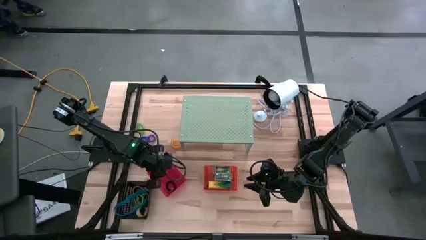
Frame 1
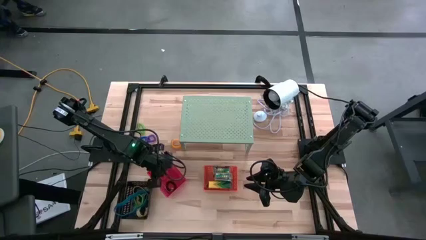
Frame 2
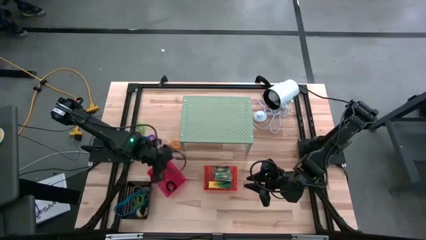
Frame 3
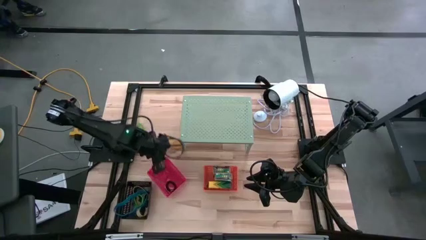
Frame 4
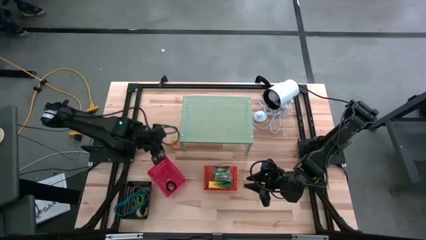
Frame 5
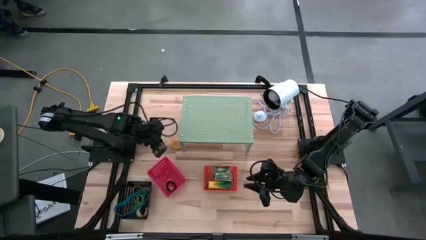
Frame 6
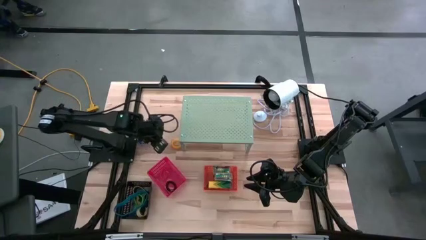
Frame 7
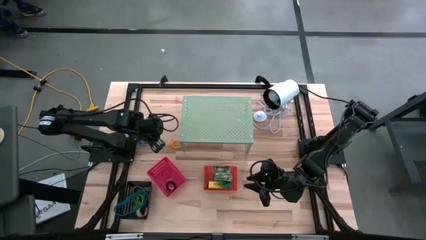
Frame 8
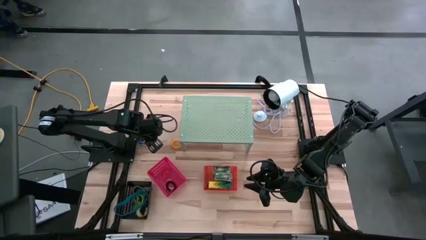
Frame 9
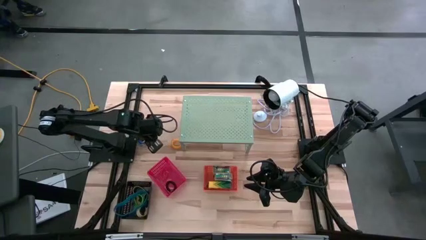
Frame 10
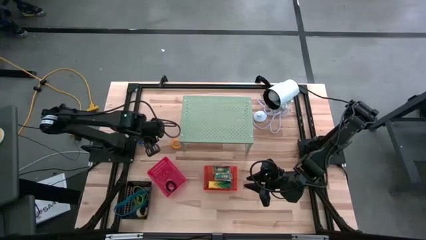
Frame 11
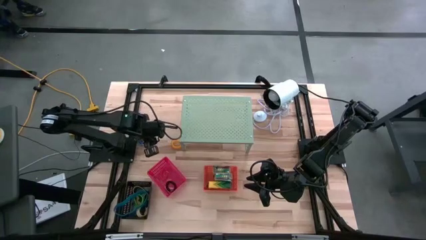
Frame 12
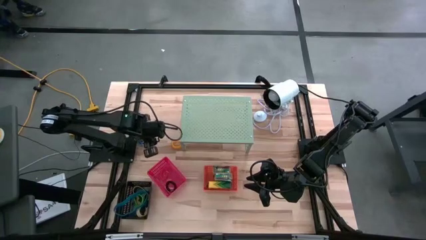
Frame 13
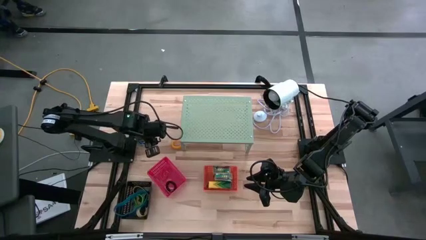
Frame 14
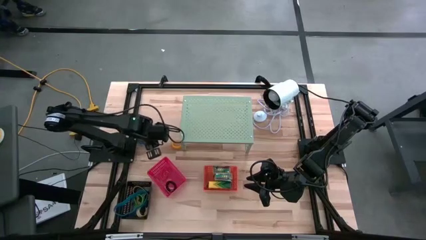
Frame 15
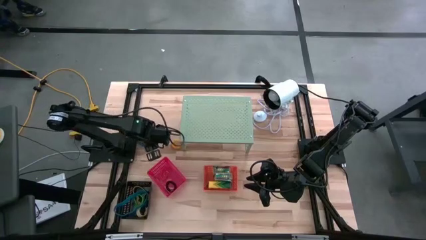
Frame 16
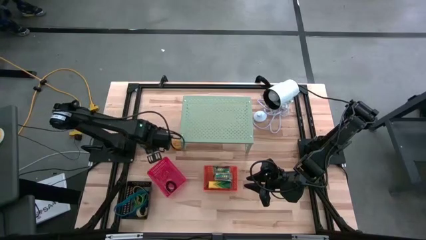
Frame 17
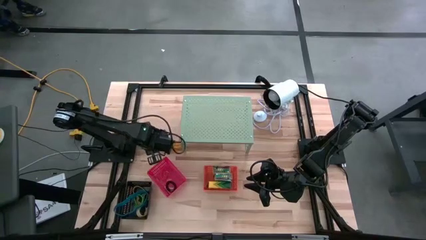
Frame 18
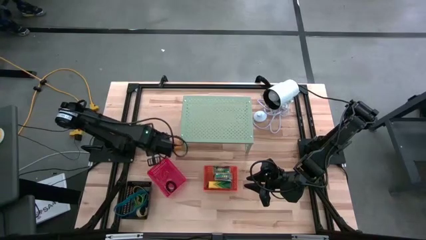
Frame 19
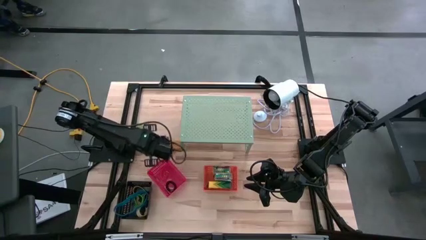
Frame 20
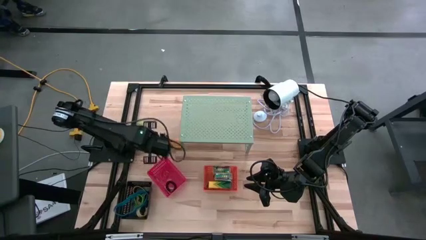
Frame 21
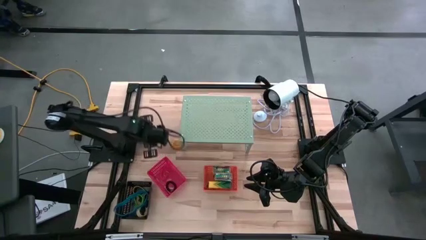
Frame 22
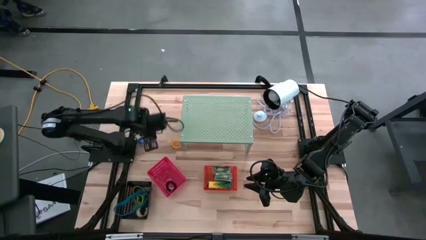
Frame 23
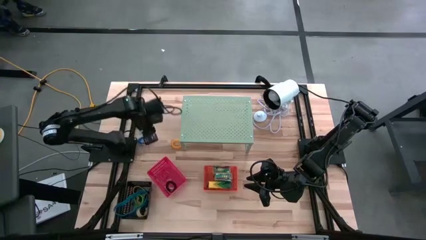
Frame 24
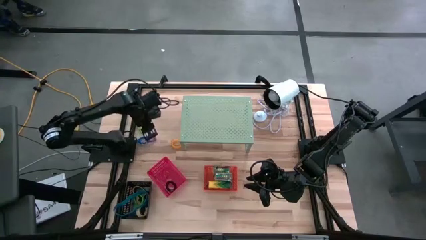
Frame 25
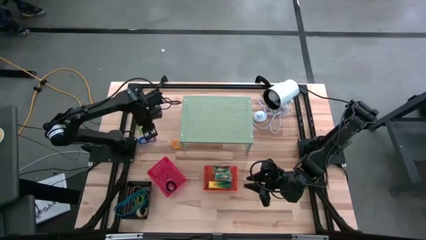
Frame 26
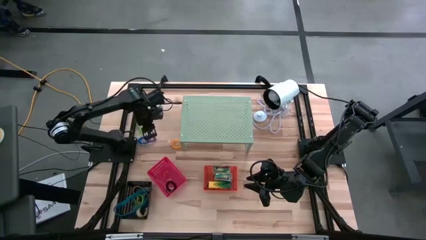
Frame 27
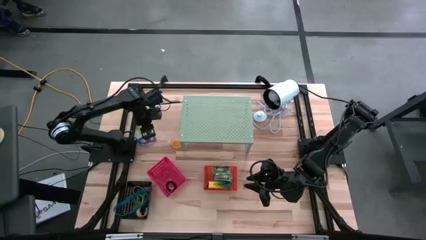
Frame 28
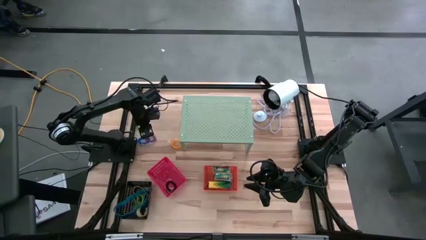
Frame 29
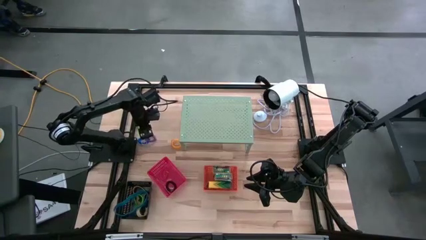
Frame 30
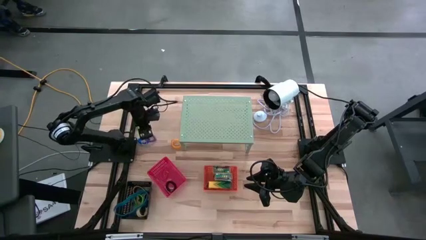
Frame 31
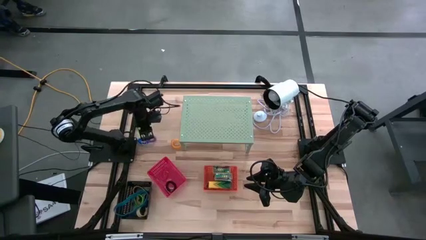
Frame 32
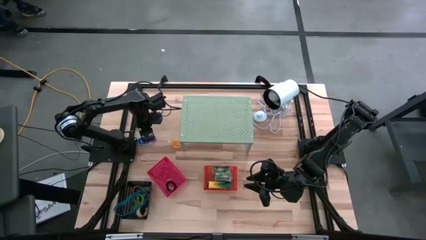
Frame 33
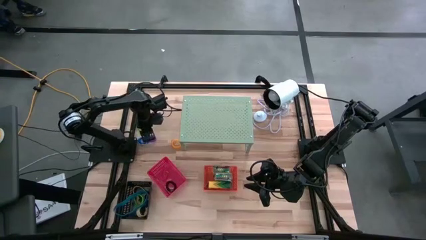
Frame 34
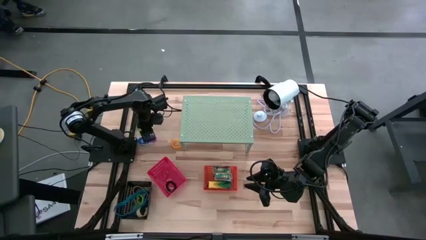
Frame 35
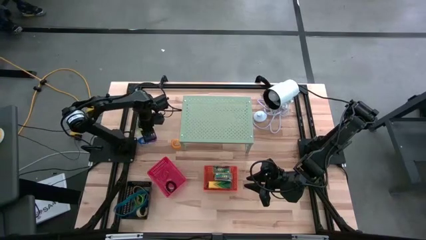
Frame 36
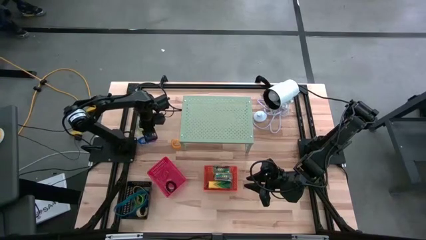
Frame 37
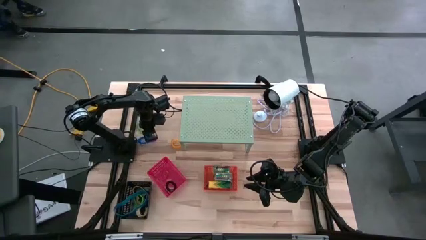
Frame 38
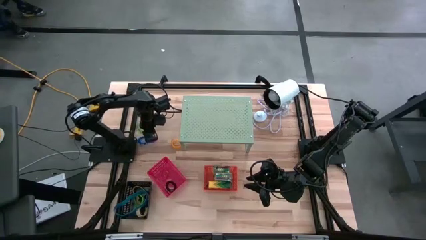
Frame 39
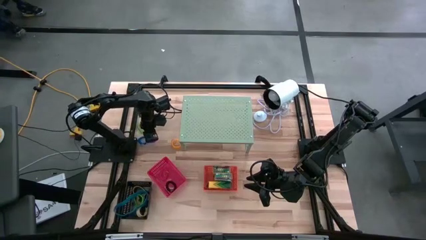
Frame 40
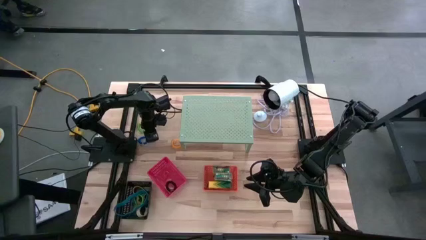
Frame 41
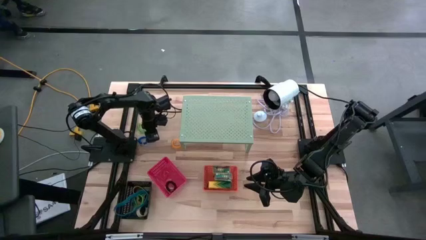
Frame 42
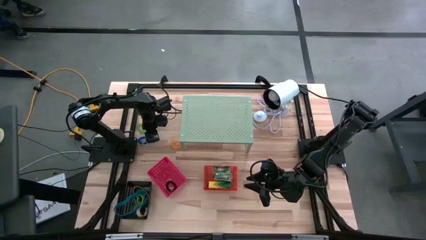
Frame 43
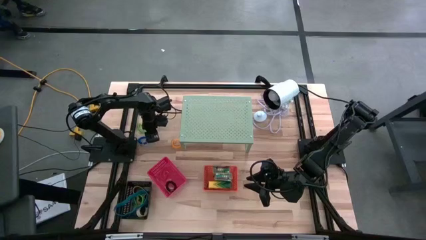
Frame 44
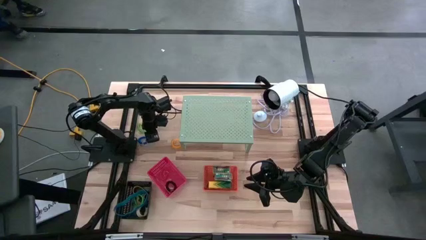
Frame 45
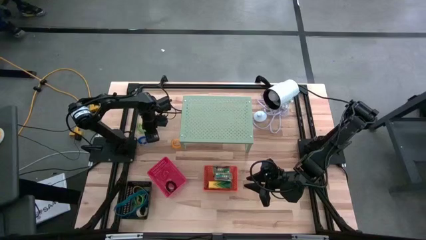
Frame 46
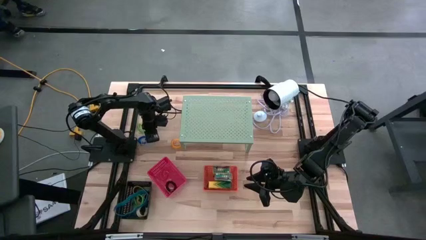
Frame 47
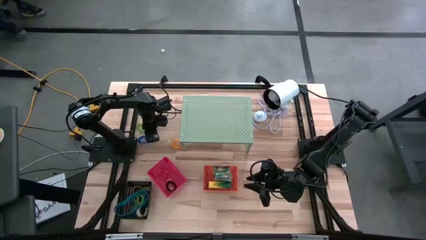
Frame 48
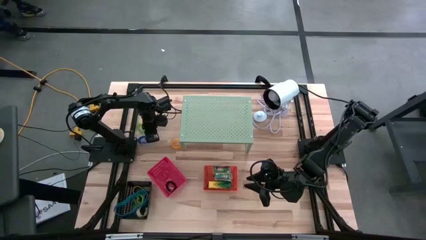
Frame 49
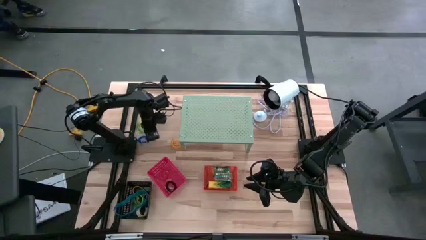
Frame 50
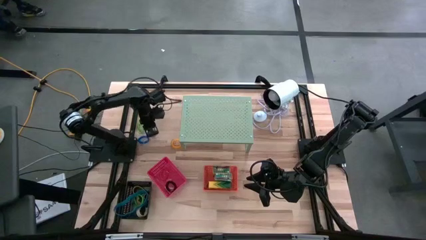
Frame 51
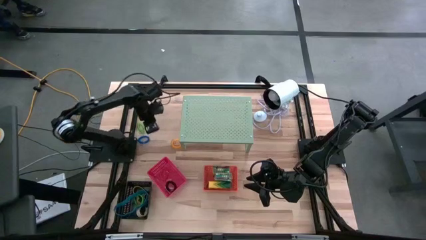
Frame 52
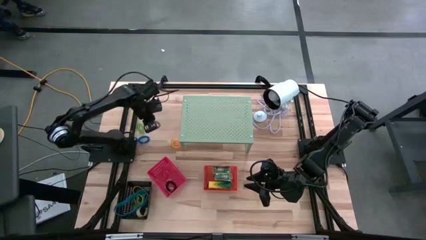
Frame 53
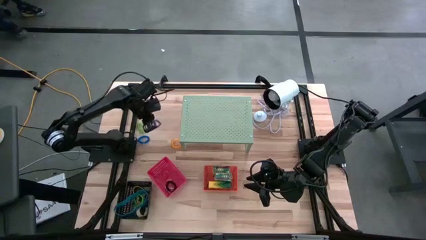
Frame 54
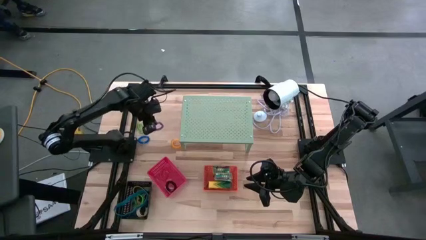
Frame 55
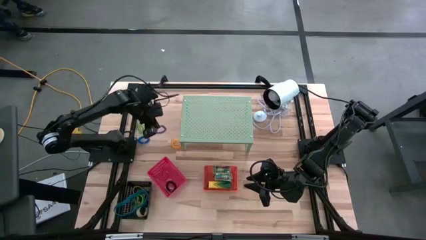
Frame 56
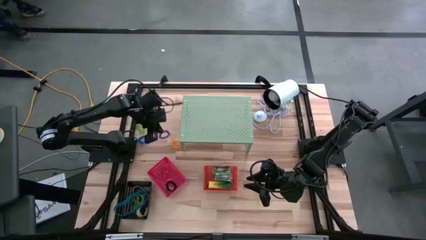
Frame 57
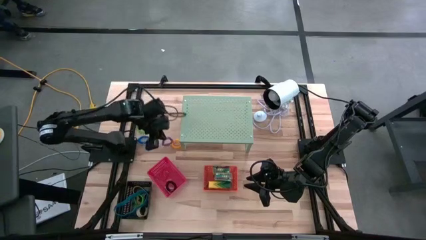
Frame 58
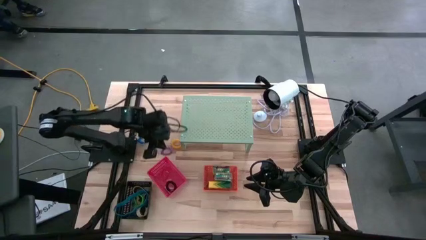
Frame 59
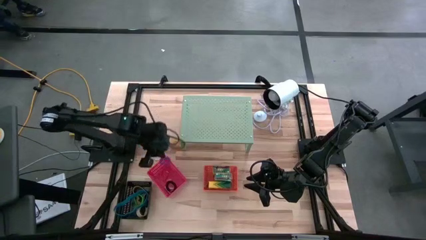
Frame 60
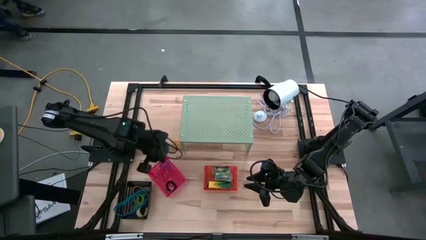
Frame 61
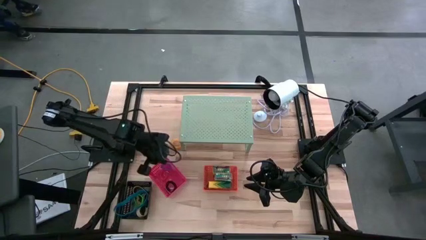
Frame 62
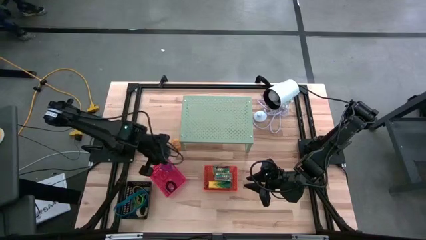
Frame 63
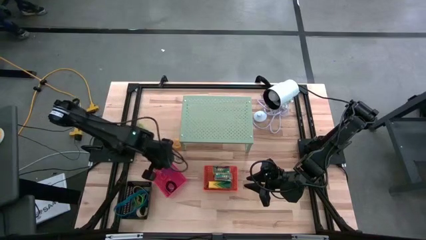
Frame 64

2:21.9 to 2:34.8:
Task: Pick & Place Office Desk Supplies
Put the violet spring keychain into the red bin

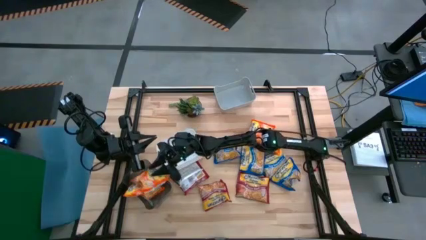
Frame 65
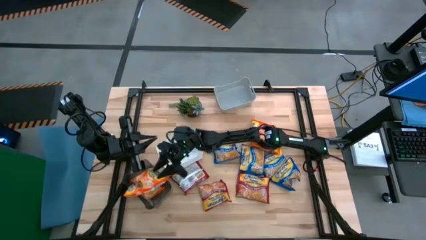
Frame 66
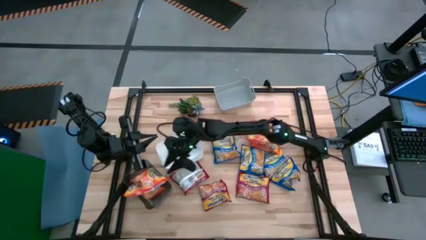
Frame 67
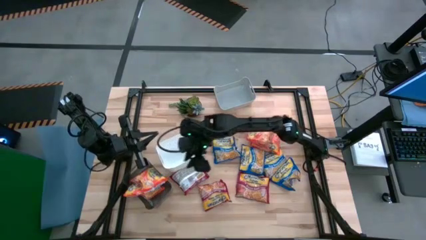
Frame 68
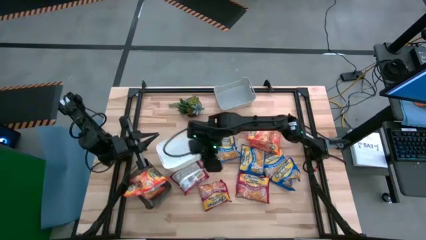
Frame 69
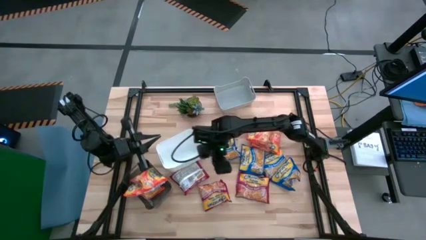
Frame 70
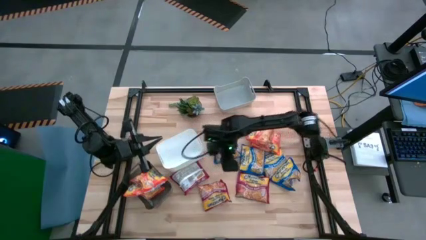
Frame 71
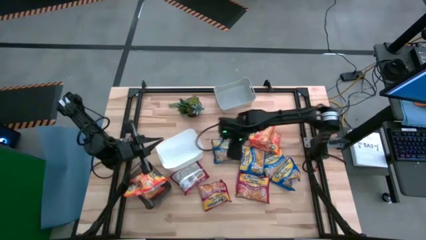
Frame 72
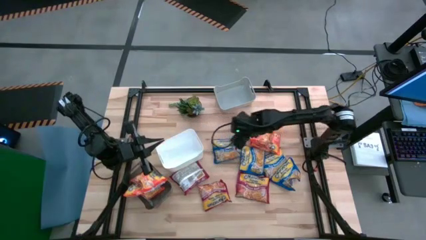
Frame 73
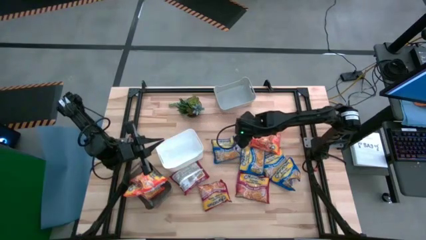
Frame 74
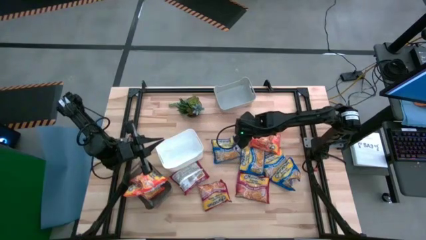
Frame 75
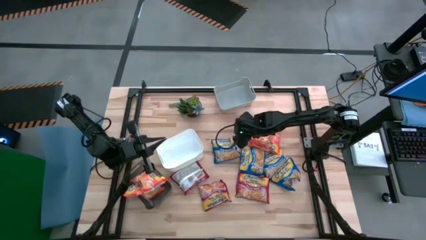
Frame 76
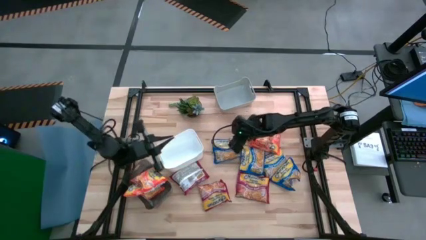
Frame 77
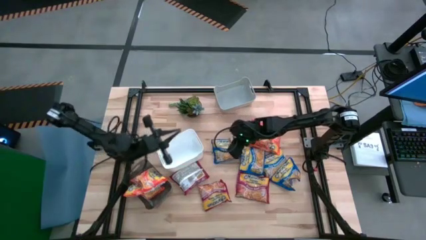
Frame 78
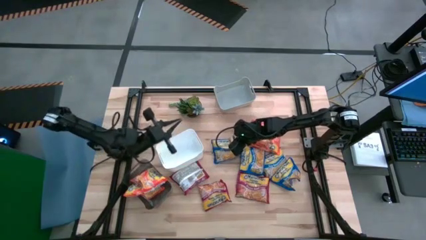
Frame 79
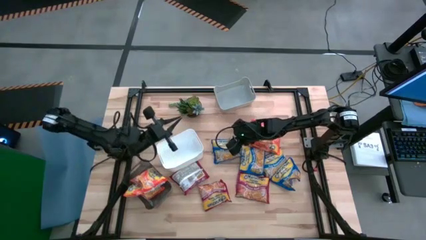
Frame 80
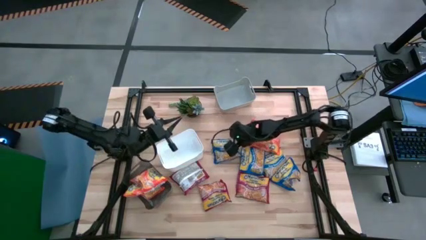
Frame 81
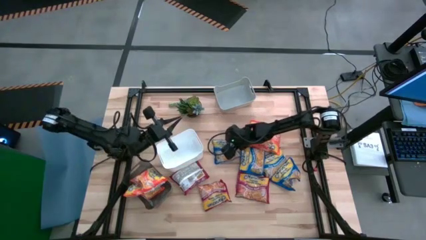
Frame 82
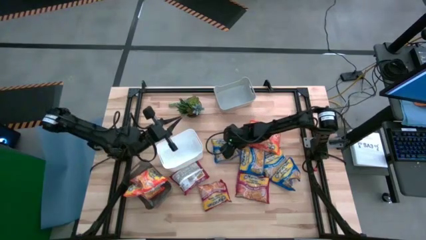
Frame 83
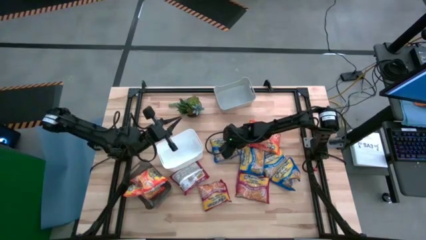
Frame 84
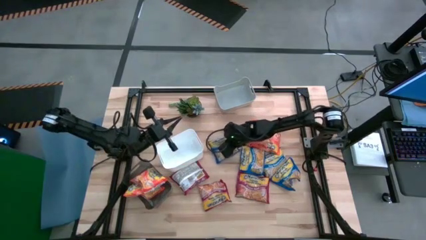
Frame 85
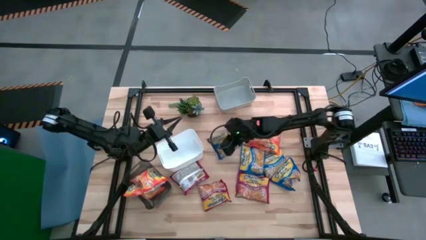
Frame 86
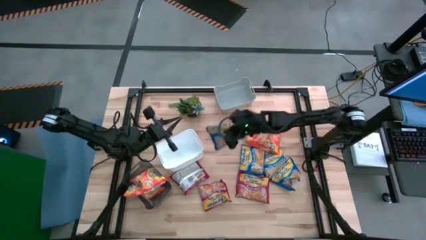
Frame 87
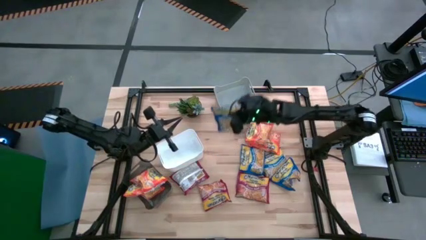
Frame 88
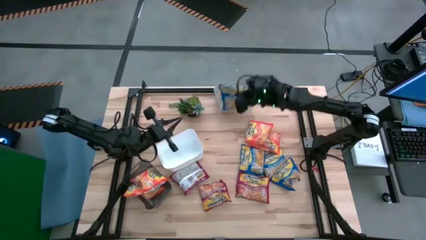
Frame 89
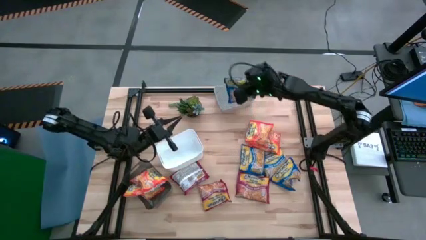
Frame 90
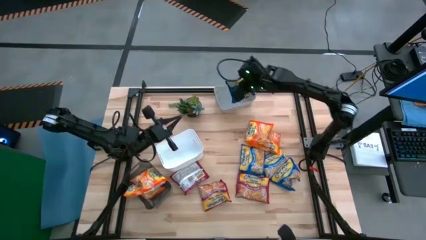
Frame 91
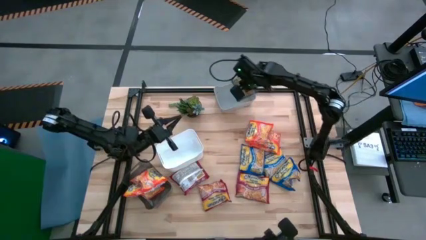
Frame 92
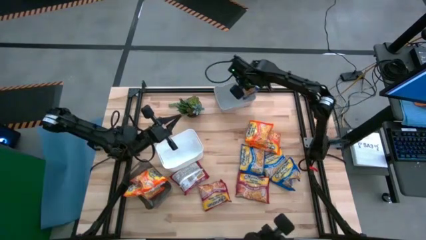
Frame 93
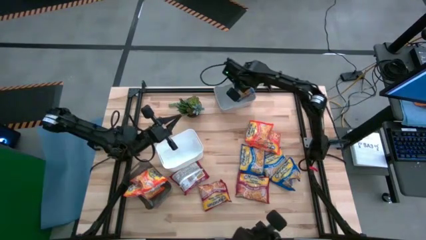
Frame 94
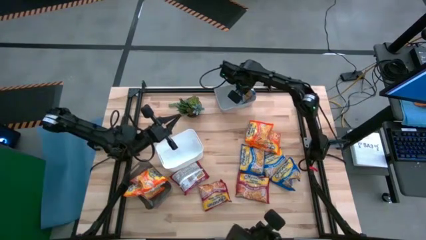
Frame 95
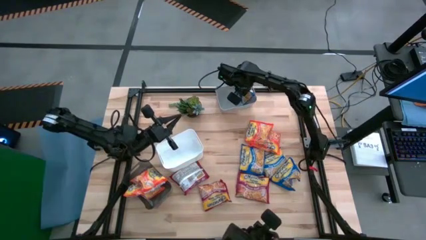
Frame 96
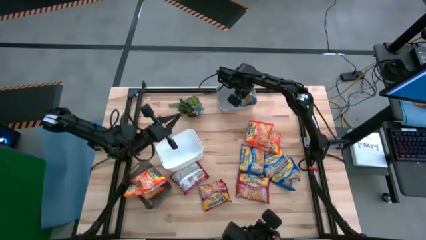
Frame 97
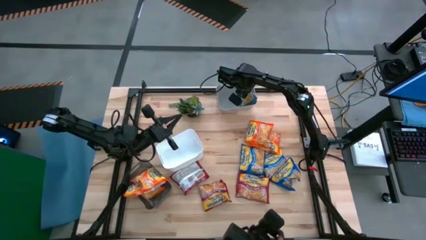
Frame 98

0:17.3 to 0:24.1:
Task: Sort Maruchan noodles
Put the blue noodle pack into the gray bin
